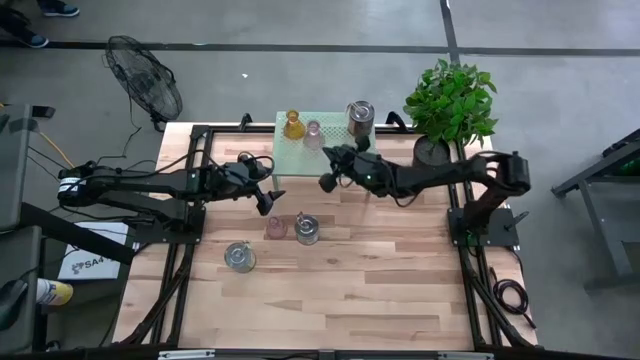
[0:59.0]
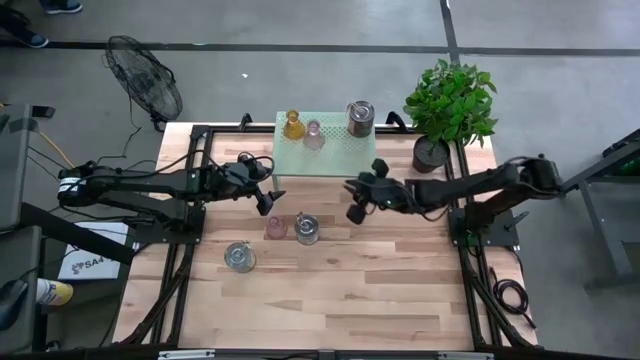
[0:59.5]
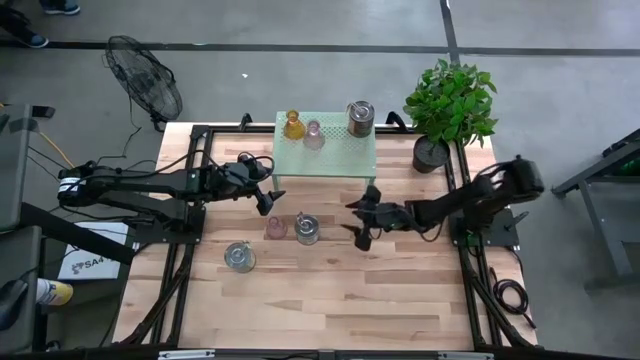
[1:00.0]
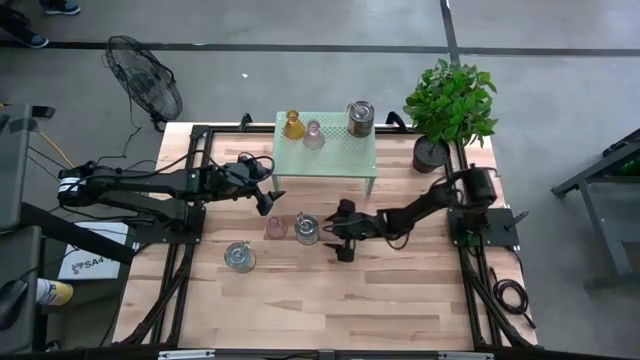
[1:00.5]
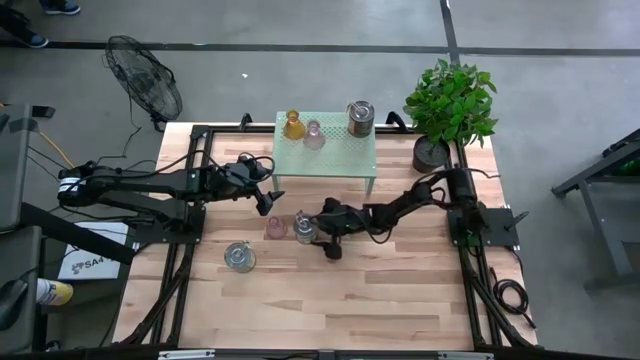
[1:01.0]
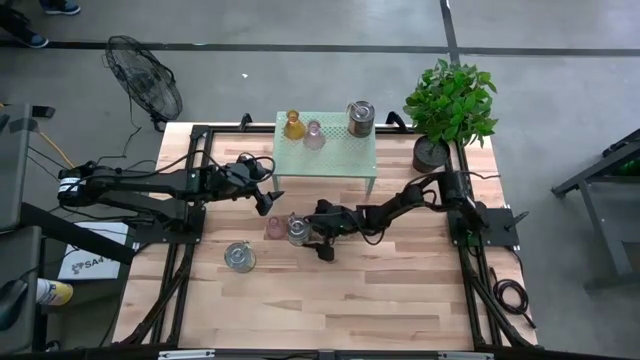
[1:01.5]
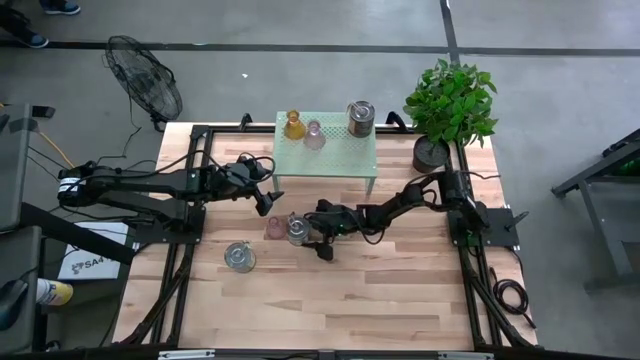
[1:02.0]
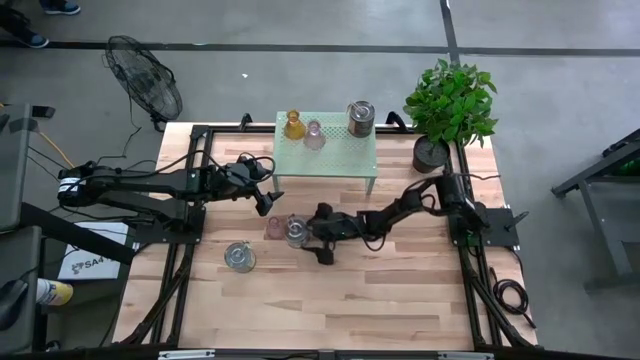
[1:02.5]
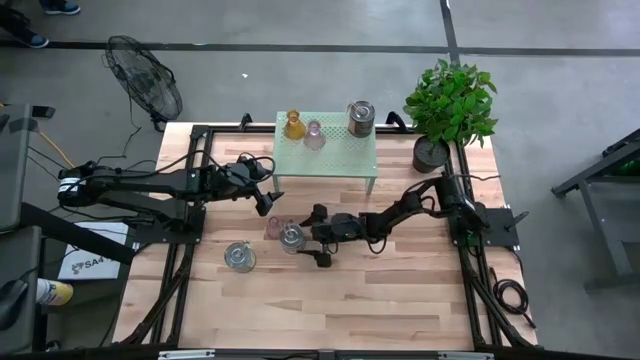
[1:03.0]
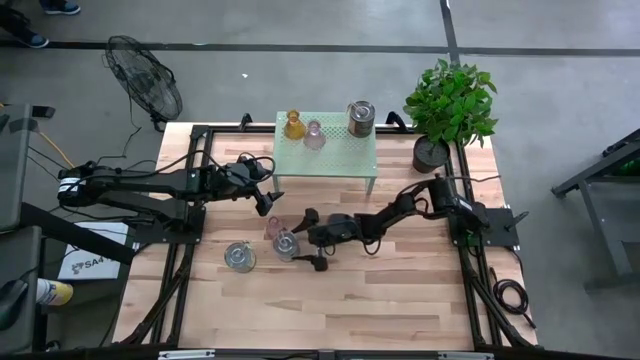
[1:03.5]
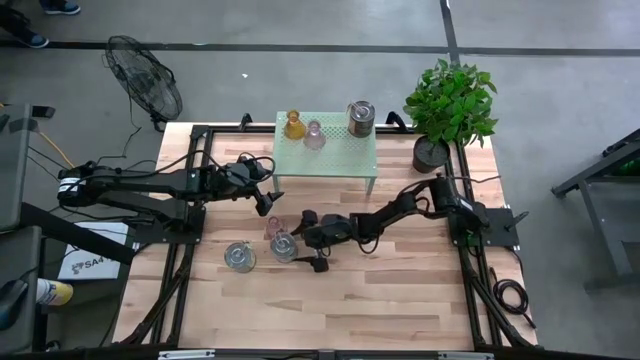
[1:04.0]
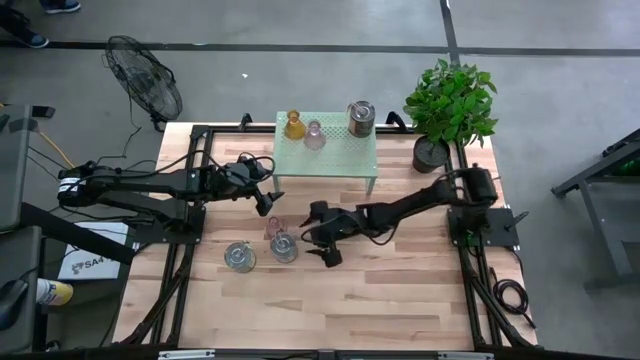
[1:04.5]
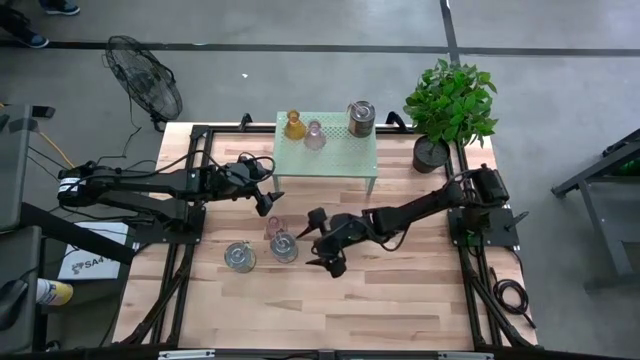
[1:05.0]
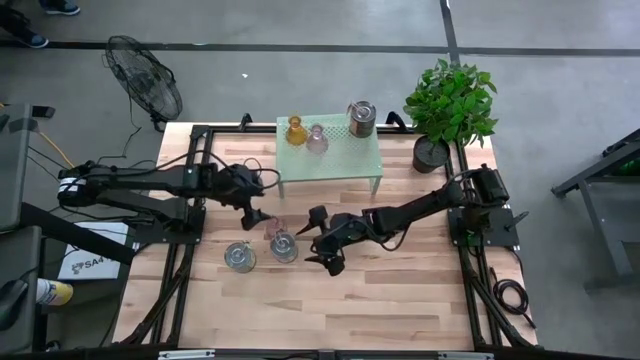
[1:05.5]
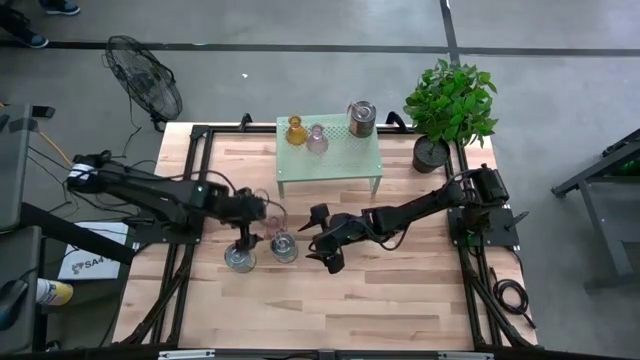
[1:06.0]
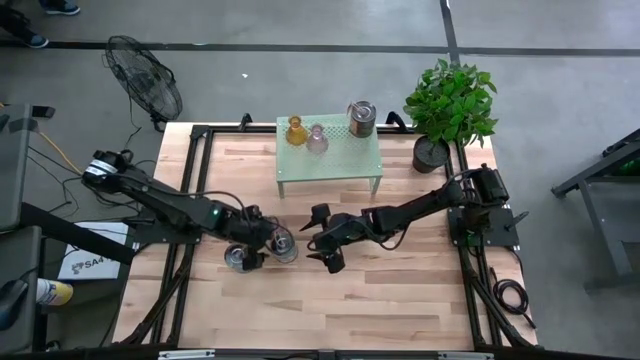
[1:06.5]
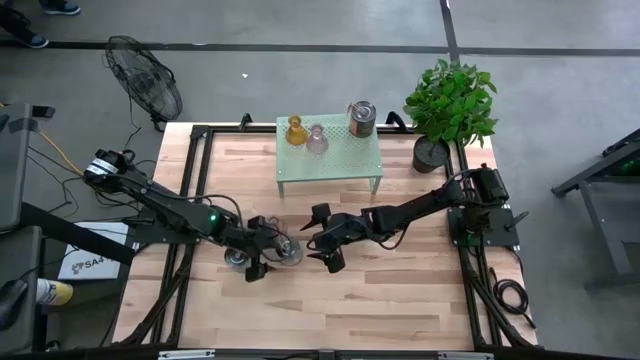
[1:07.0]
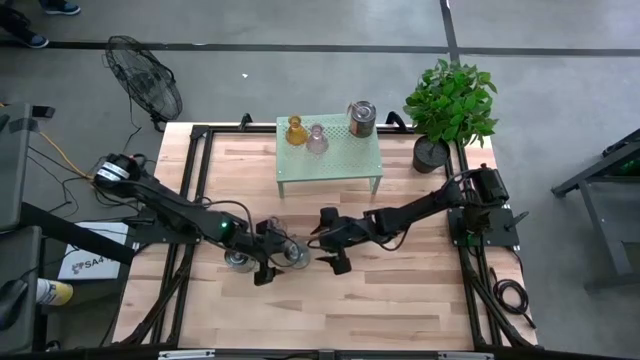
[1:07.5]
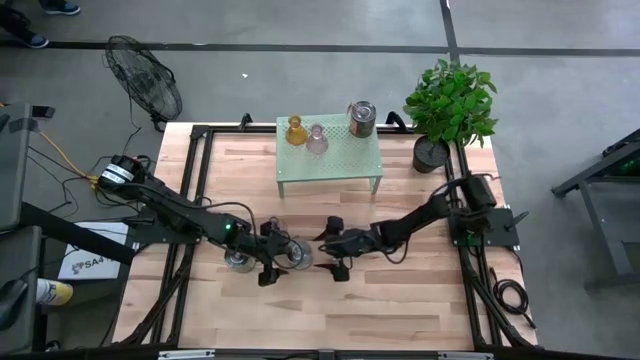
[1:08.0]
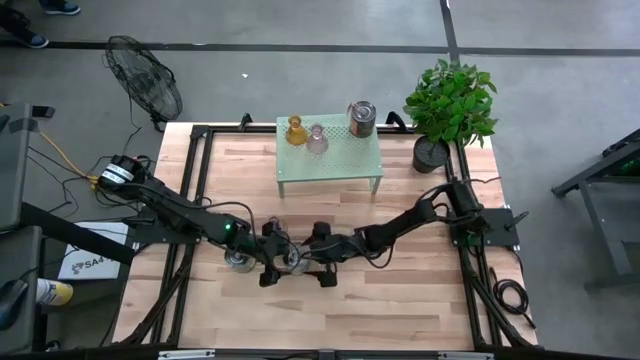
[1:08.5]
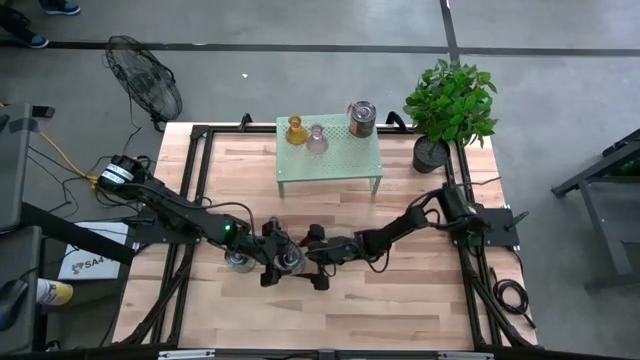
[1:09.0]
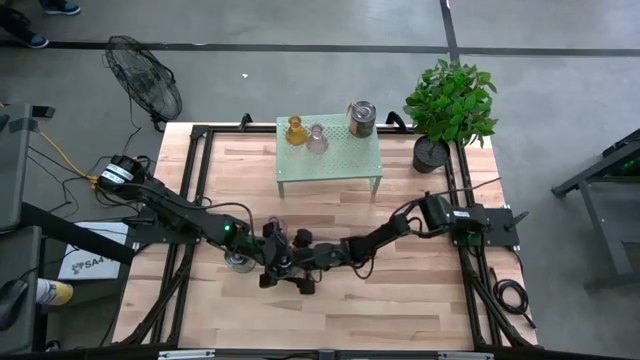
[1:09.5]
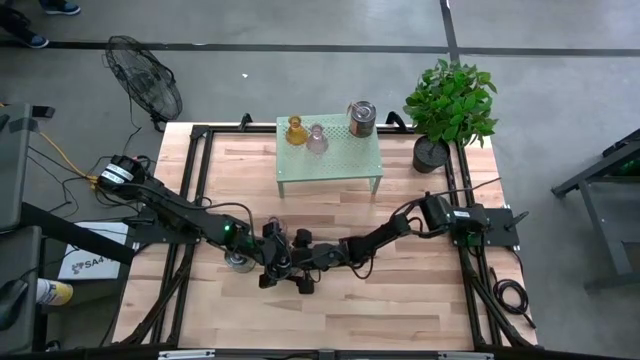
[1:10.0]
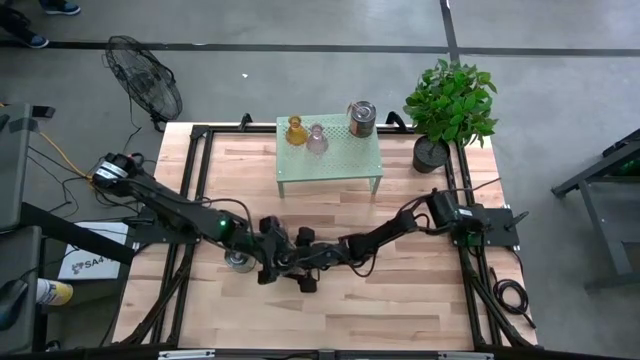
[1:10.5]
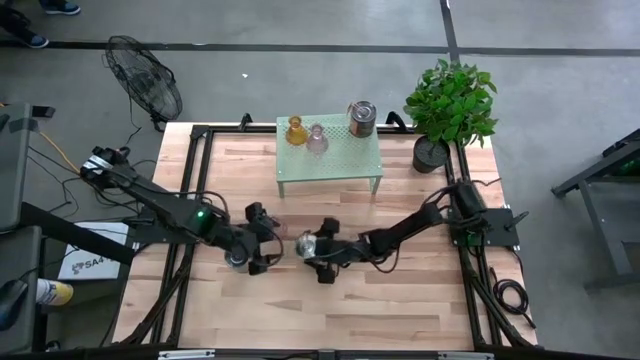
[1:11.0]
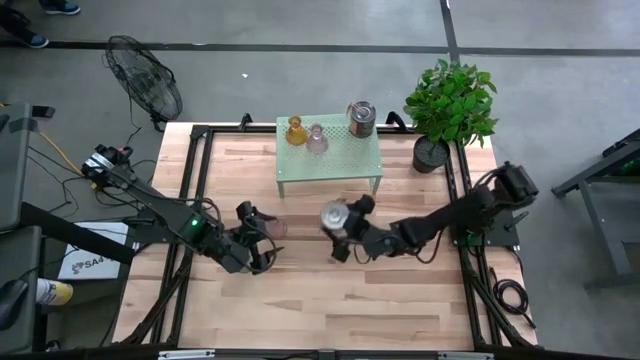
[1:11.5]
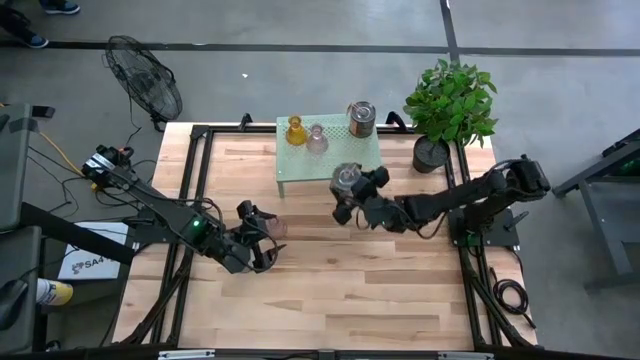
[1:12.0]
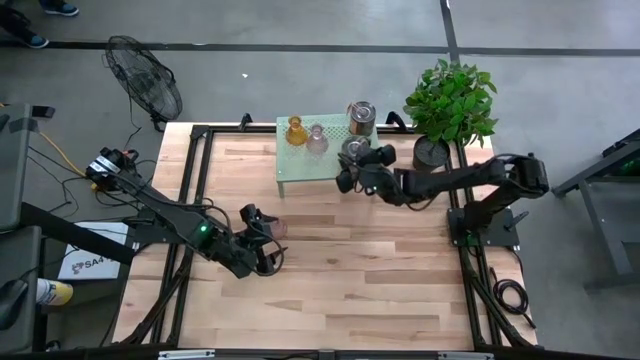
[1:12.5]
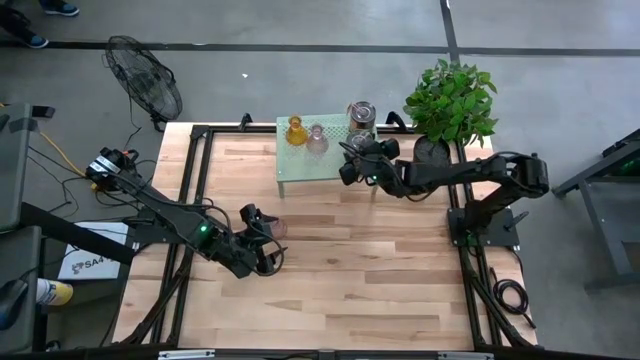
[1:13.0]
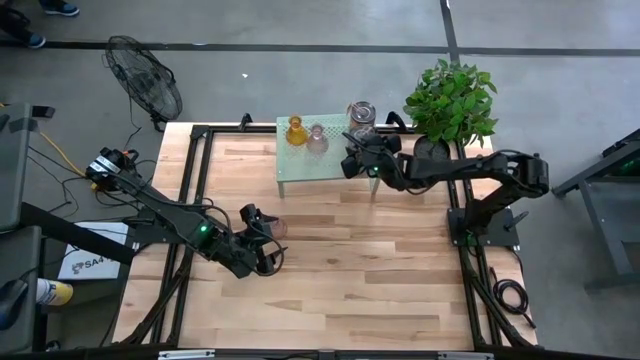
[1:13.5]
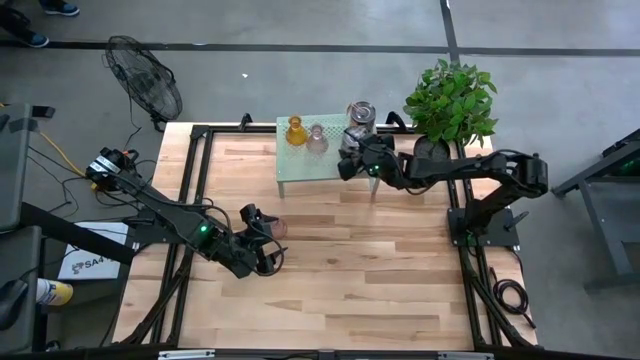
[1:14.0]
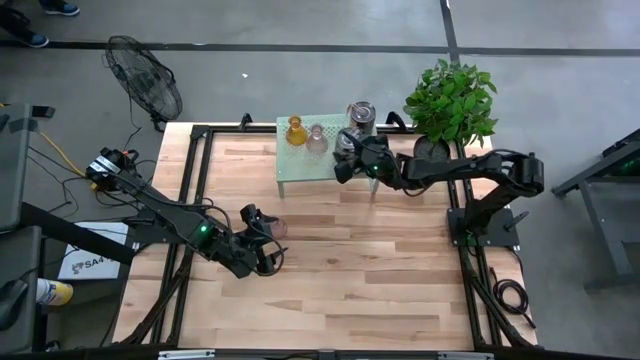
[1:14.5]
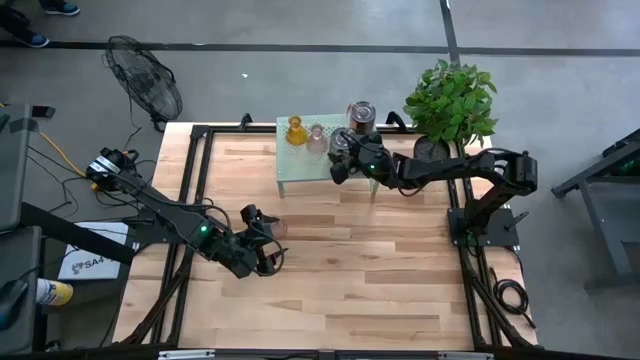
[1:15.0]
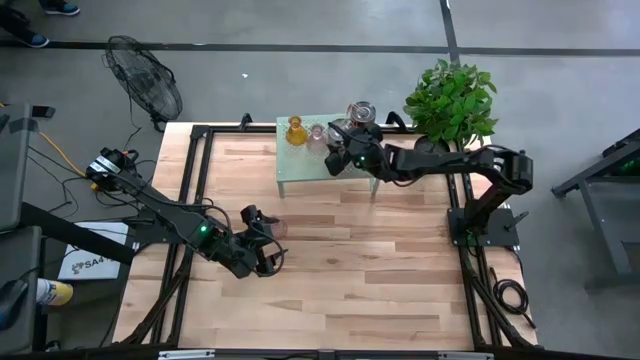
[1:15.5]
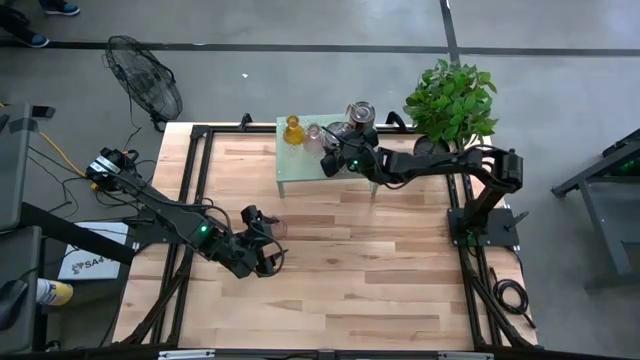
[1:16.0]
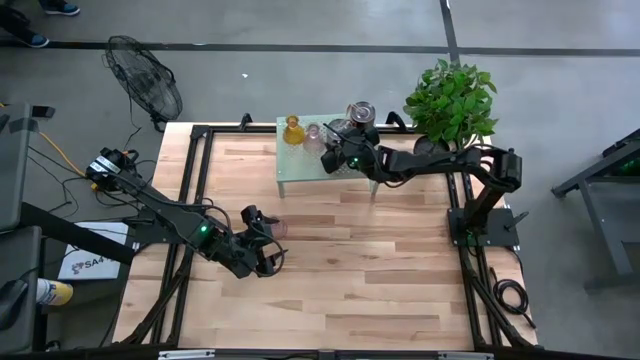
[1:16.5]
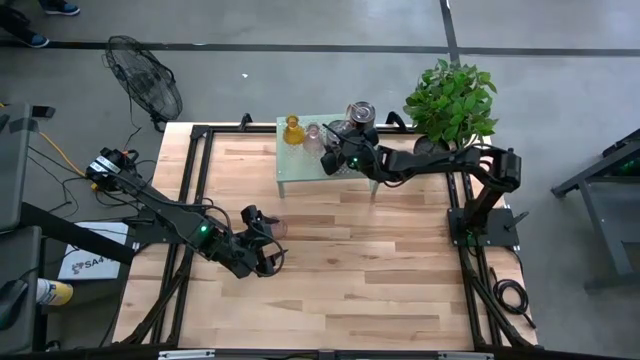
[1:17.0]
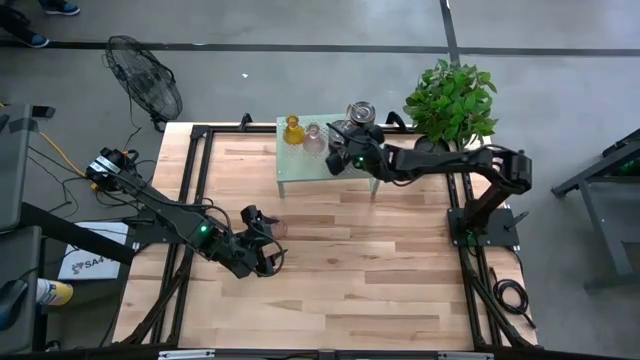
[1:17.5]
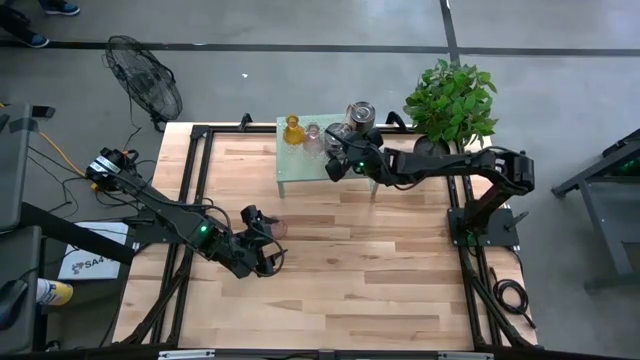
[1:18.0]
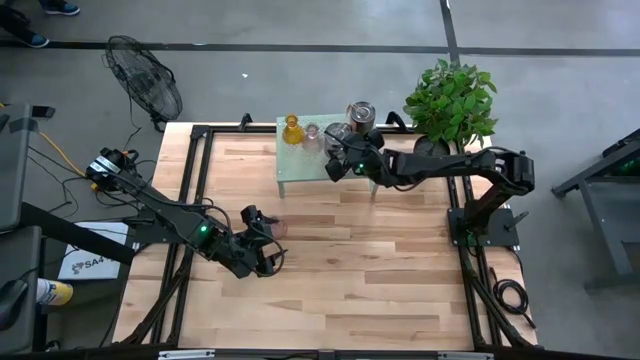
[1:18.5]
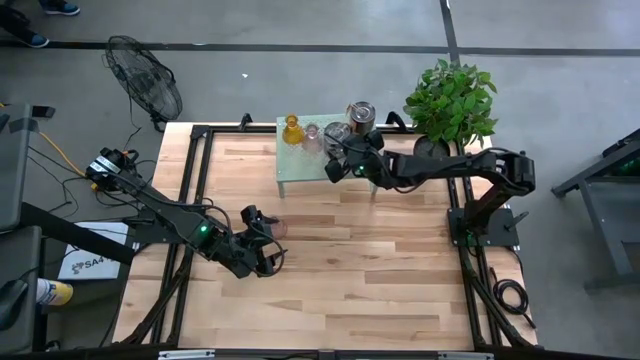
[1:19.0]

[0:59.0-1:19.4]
Task: Pick & Place candle stick holders
Put the right silver candle on the shelf
